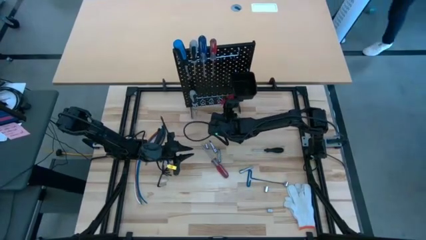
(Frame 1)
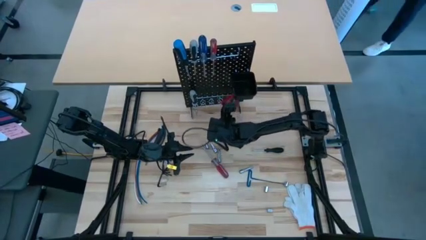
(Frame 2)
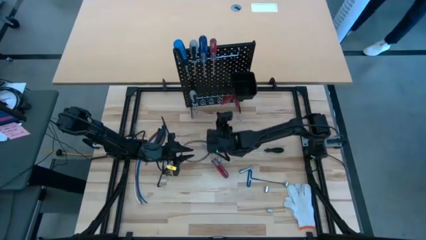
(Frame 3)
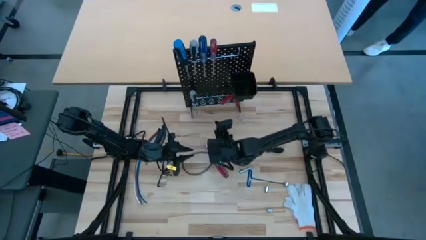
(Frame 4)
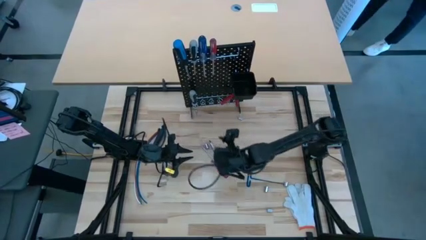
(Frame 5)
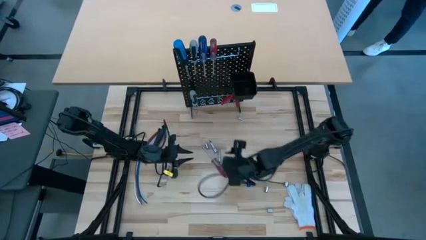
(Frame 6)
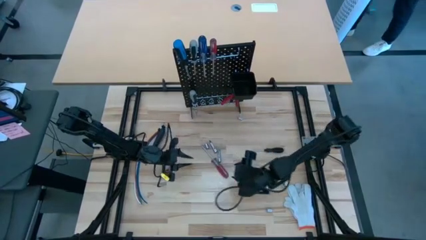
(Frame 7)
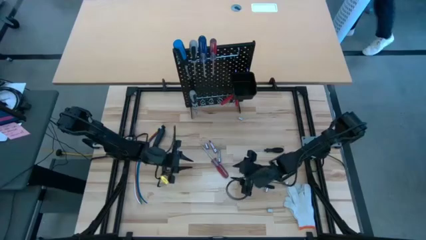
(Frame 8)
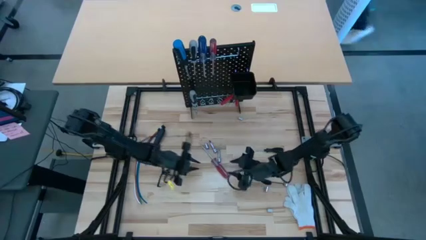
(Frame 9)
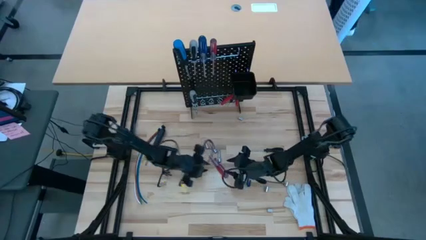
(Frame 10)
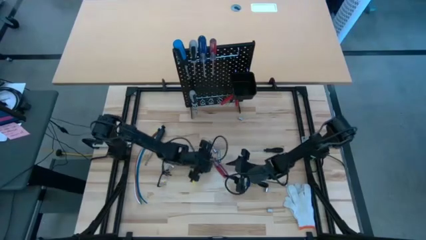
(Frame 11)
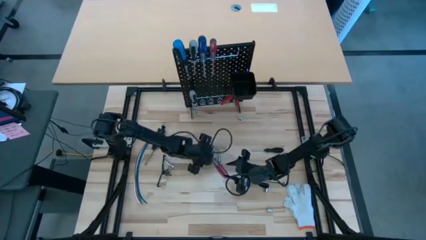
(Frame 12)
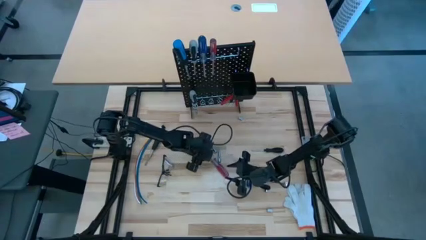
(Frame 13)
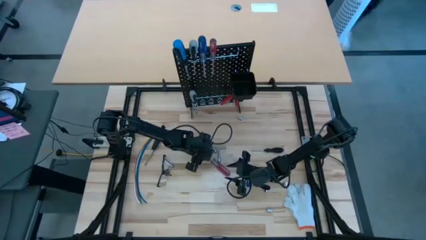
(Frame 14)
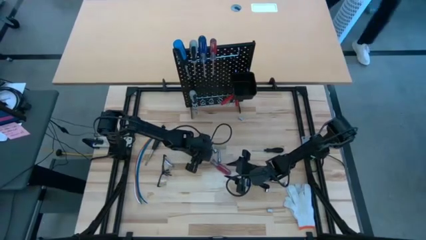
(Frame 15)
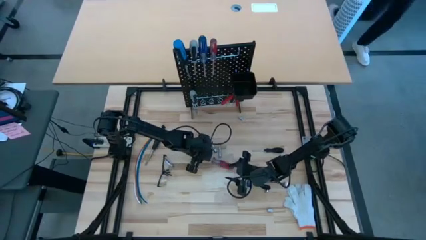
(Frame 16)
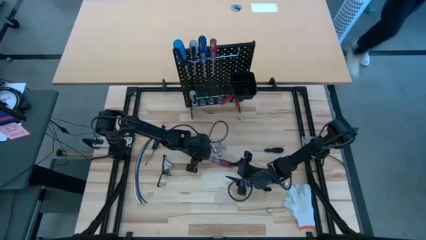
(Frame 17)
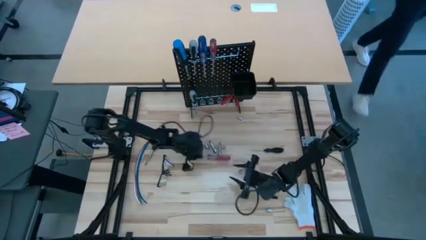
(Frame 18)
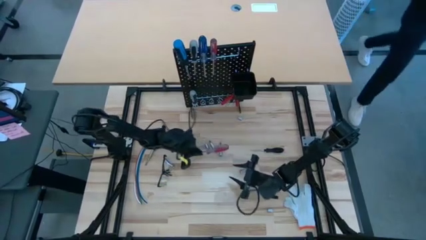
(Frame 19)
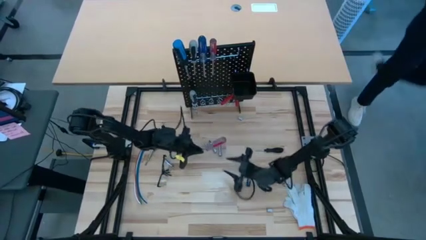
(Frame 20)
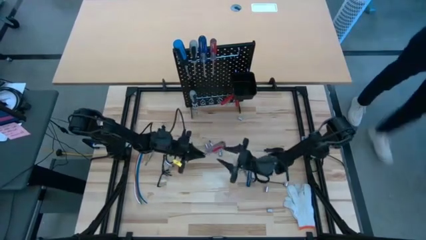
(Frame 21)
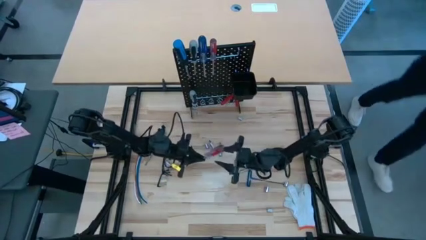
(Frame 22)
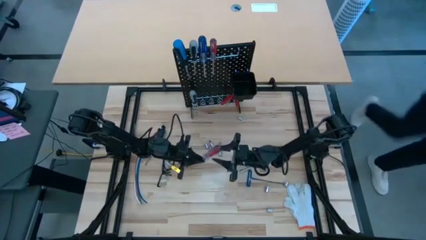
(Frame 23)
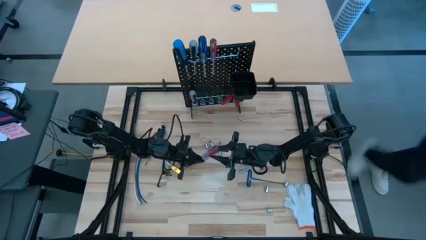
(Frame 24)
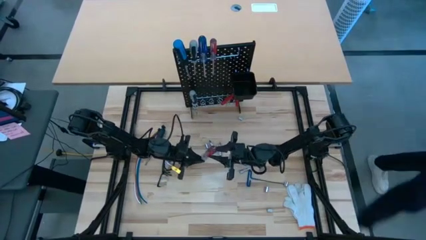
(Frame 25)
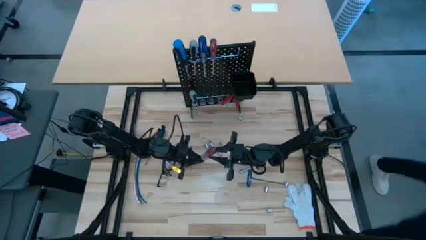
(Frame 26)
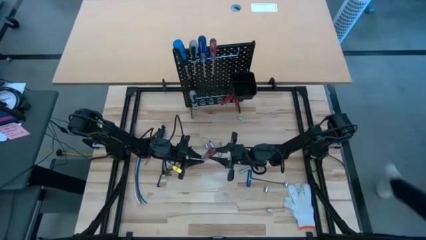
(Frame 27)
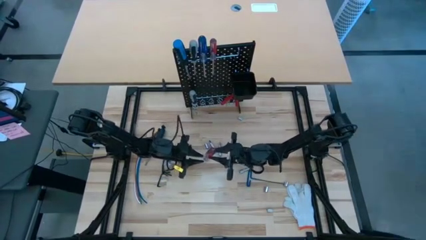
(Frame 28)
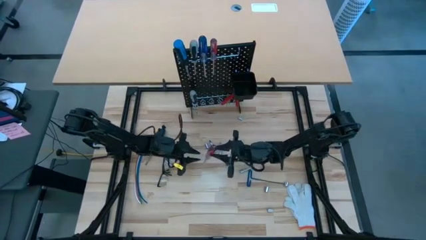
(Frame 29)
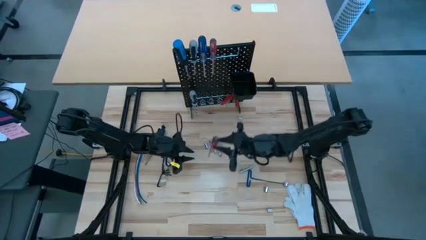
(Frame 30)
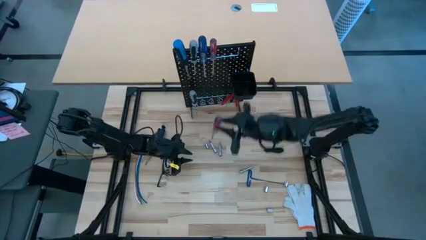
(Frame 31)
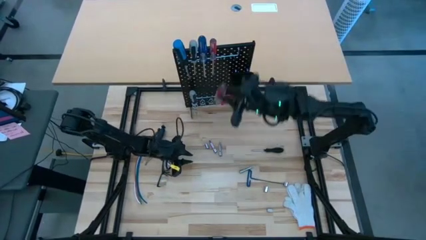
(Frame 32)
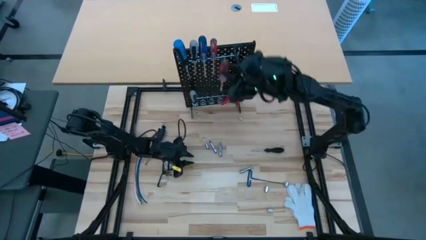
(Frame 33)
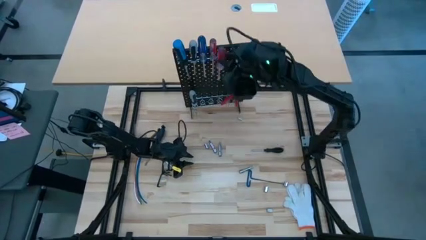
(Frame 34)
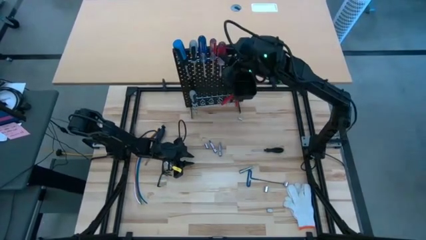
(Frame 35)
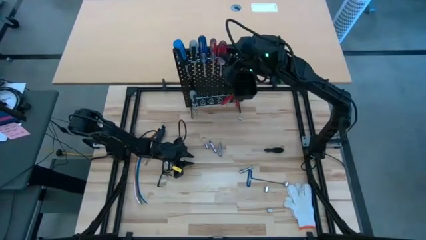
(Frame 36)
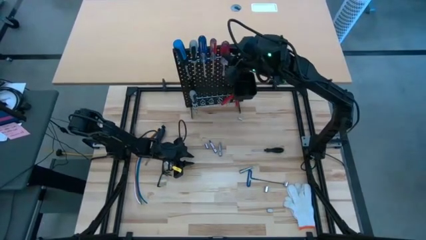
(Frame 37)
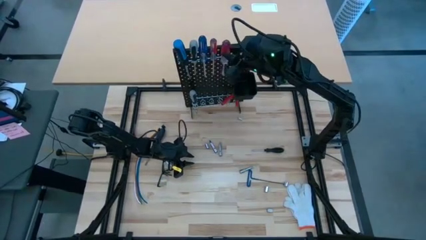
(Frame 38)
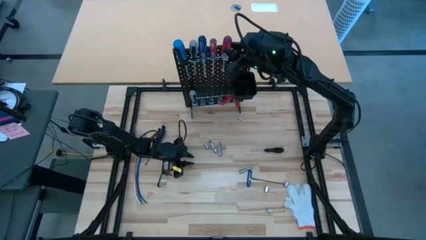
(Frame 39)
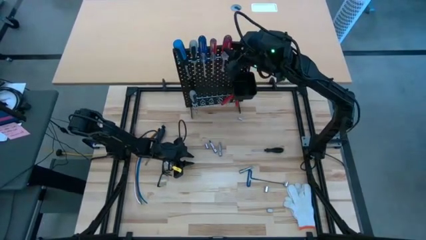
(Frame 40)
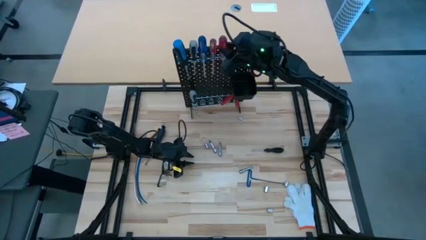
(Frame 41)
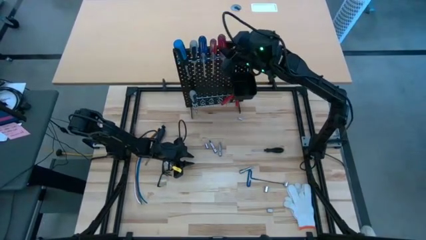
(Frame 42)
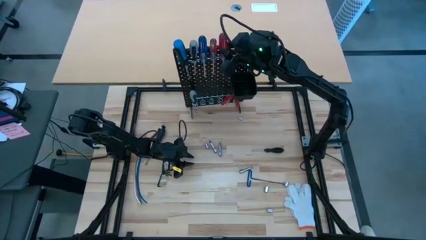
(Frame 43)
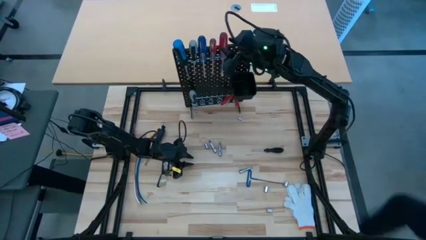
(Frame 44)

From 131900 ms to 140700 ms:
Task: Hang tools onto peg board
Hang the red screwdriver on the pegboard

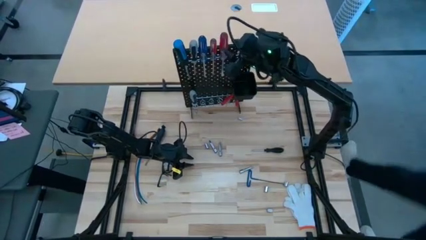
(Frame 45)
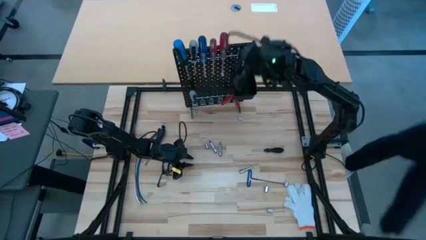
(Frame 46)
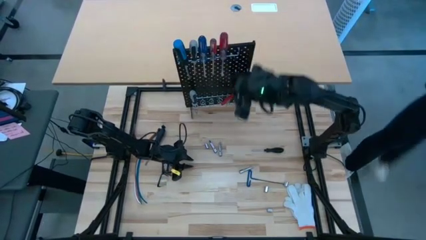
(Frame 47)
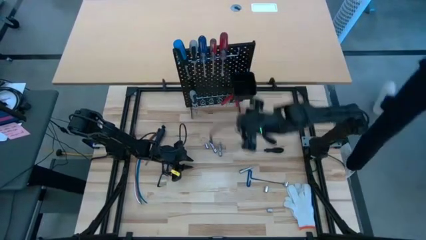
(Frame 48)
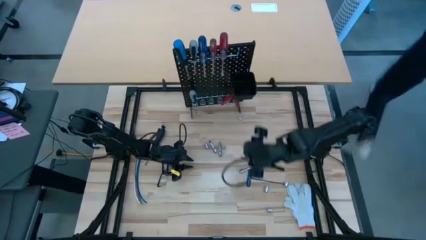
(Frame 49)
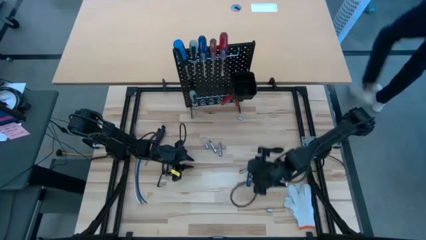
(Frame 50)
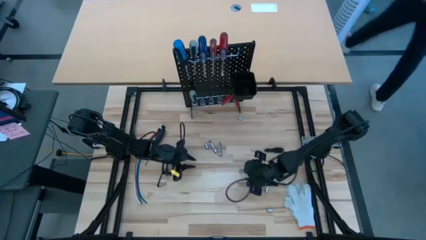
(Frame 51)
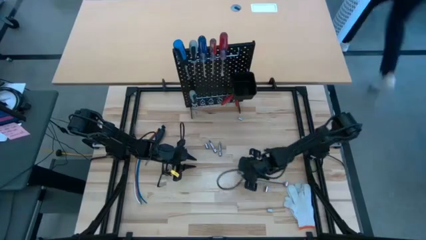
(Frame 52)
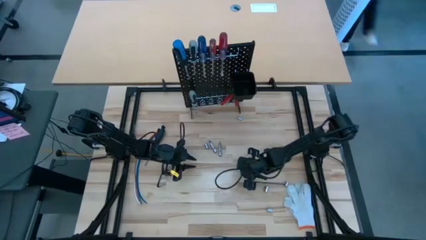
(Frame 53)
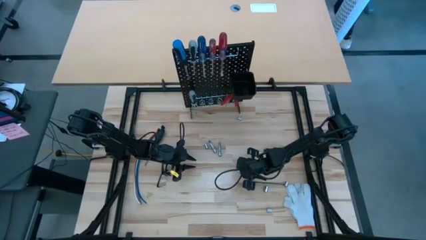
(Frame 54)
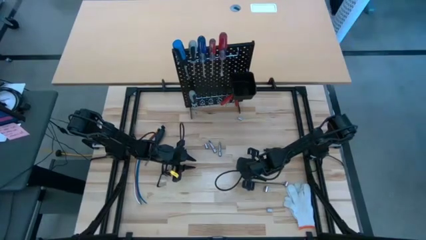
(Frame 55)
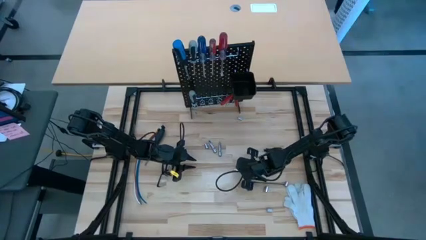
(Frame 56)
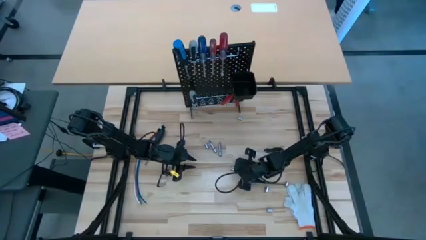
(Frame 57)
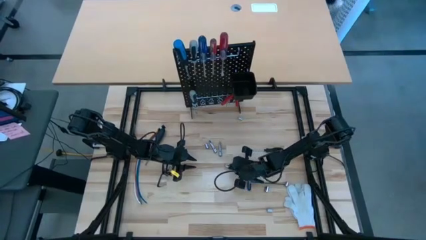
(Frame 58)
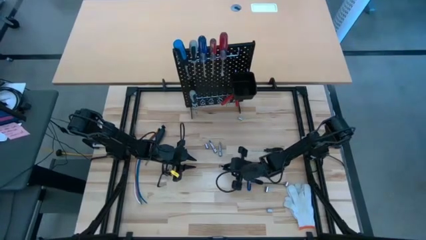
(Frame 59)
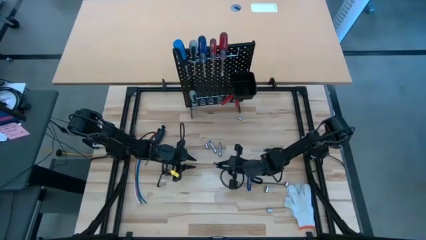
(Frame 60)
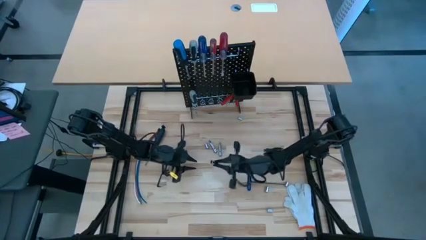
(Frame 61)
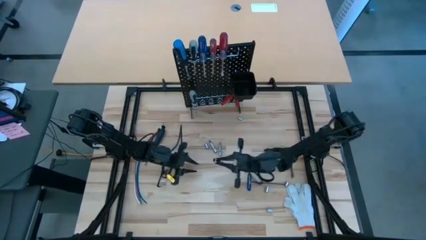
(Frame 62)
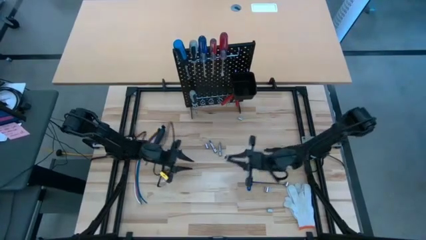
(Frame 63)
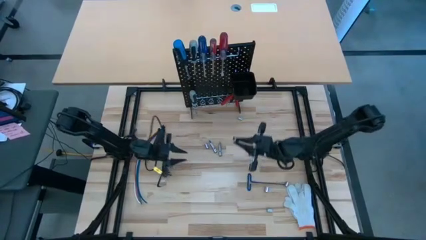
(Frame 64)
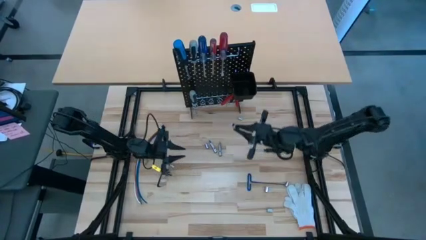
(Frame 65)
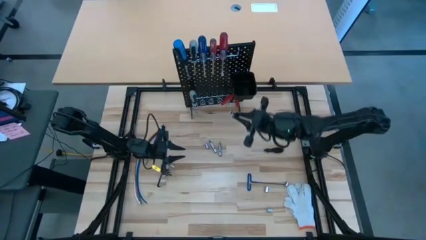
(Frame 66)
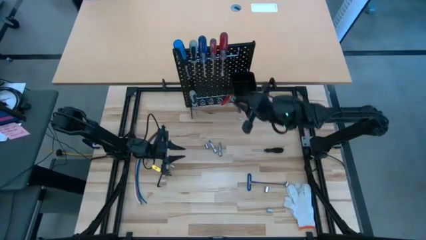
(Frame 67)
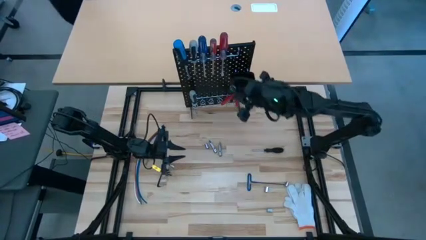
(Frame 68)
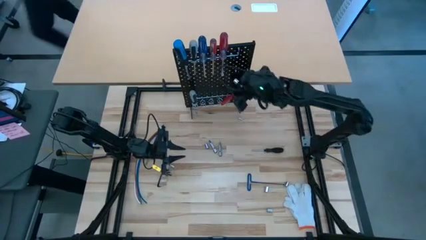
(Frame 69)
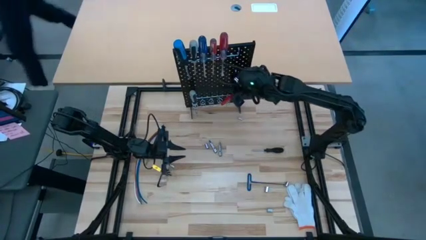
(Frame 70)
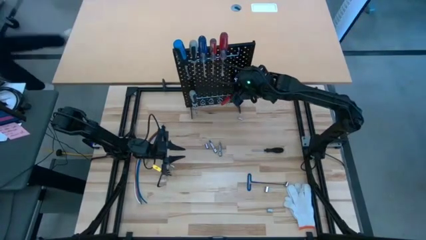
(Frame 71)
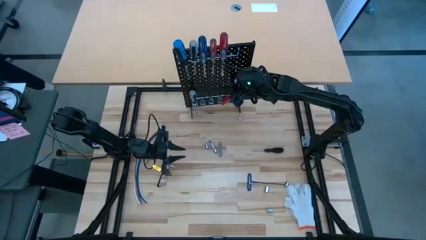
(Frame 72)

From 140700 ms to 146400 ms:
Put the extension bar into the black bin on the pegboard

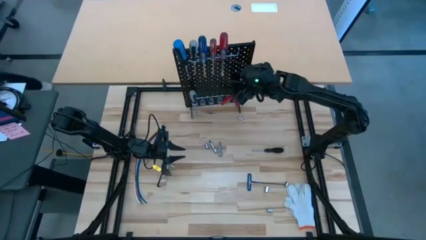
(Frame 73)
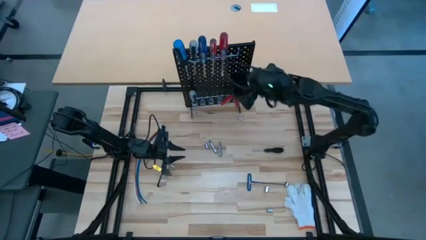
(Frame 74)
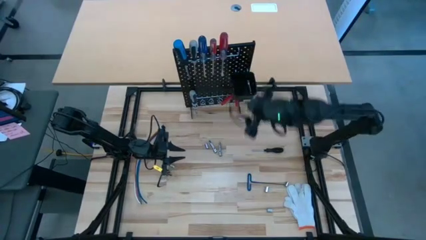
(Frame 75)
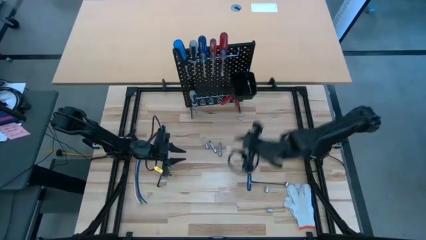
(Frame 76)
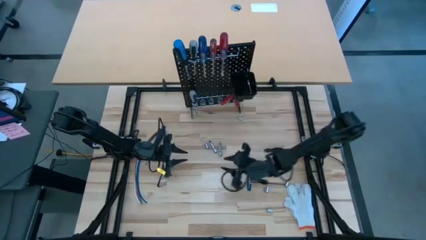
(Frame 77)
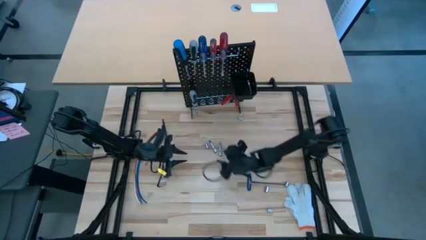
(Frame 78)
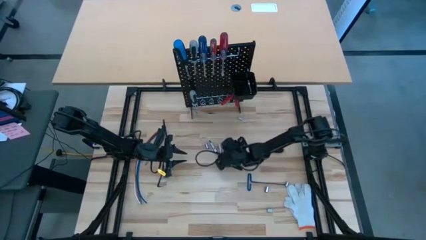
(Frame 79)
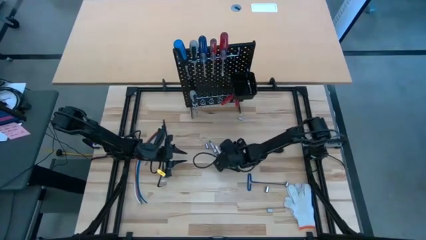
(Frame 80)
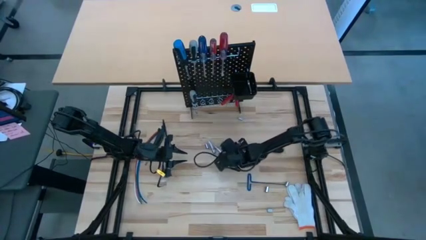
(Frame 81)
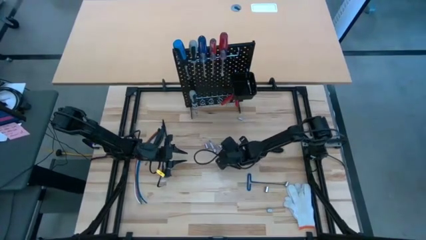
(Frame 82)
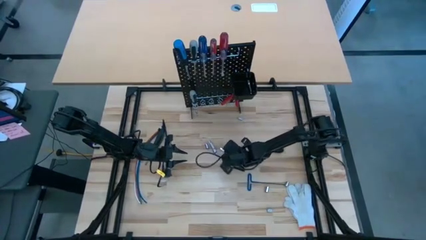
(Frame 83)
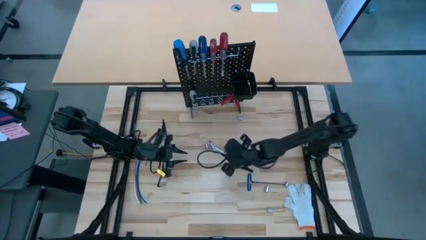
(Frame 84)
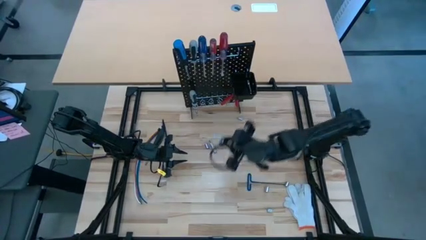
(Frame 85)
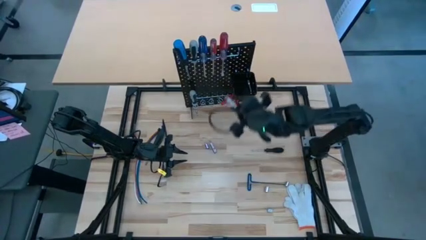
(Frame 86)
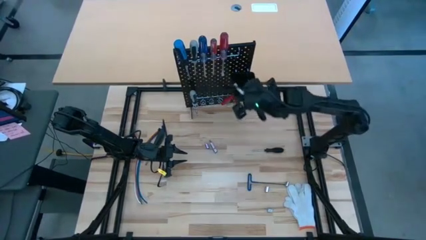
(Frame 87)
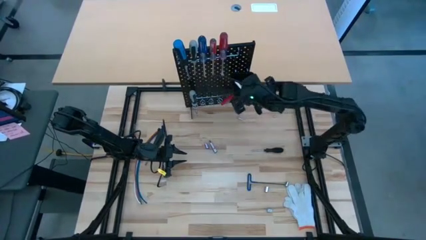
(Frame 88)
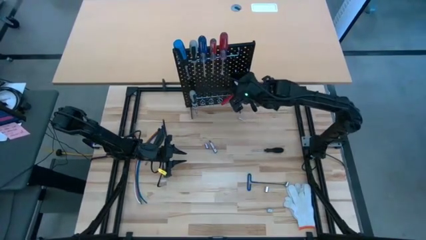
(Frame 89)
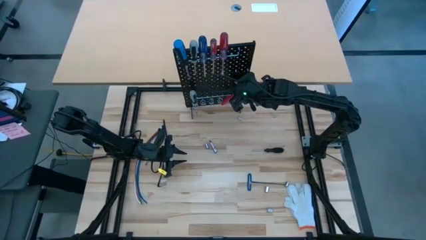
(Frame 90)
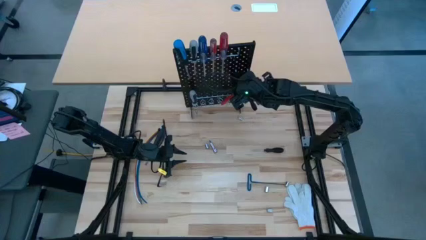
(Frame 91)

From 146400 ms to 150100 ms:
Put the extension bar into the black bin on the pegboard
